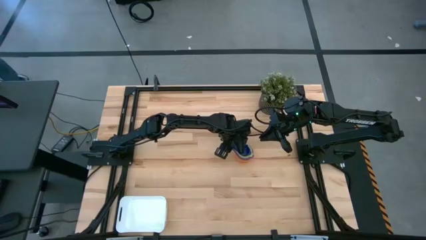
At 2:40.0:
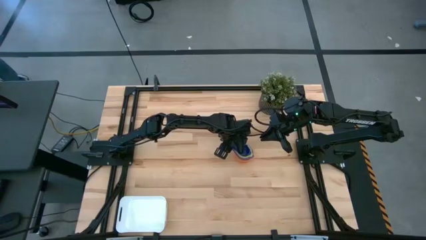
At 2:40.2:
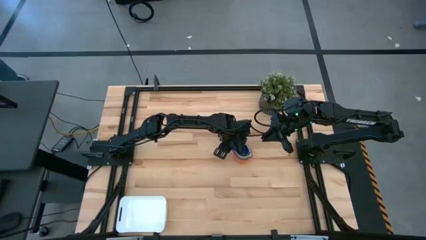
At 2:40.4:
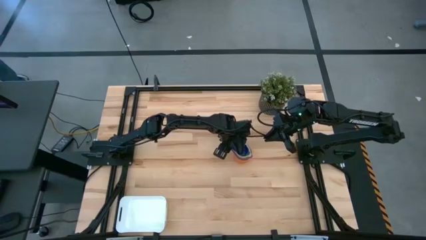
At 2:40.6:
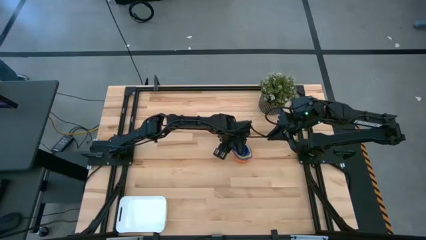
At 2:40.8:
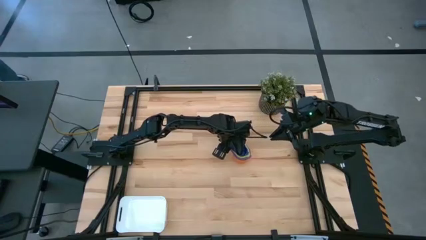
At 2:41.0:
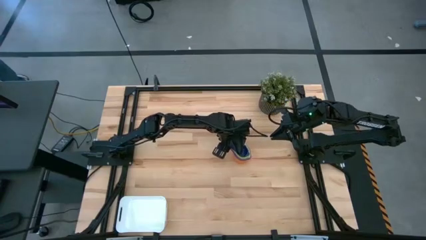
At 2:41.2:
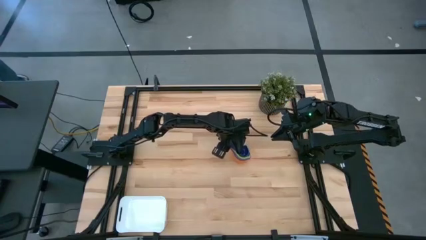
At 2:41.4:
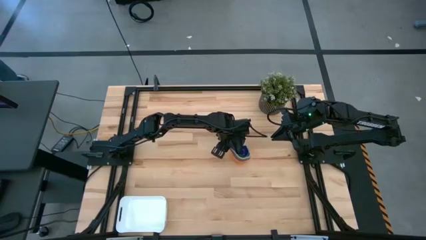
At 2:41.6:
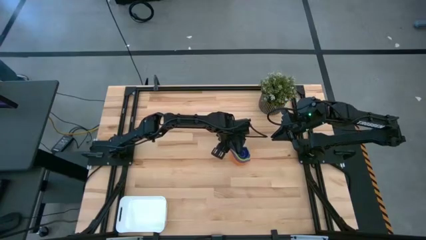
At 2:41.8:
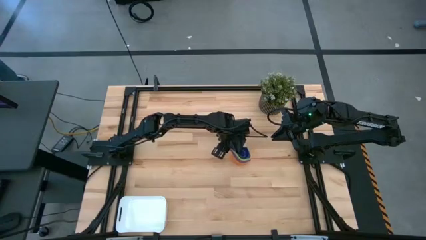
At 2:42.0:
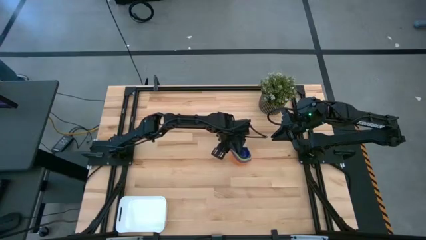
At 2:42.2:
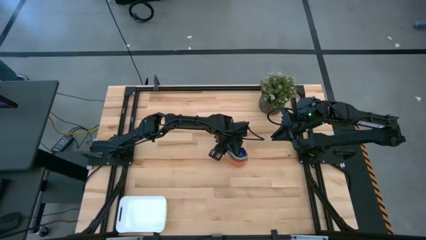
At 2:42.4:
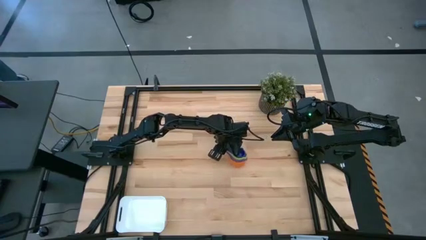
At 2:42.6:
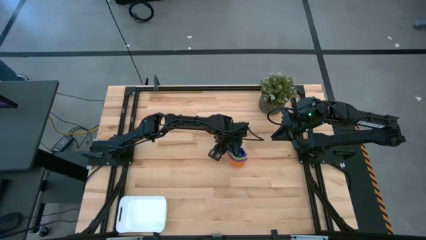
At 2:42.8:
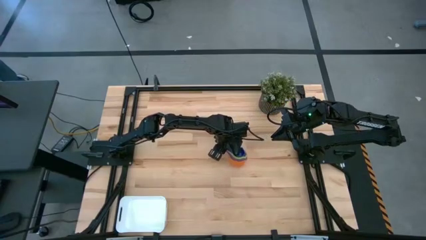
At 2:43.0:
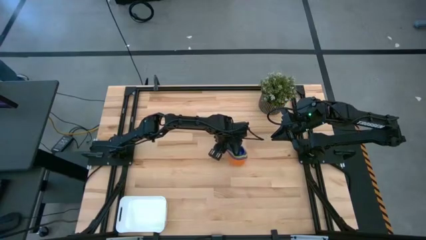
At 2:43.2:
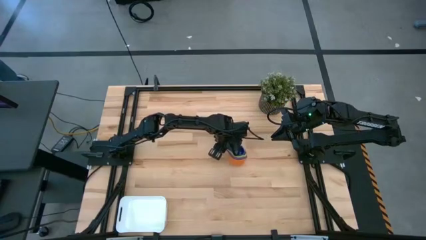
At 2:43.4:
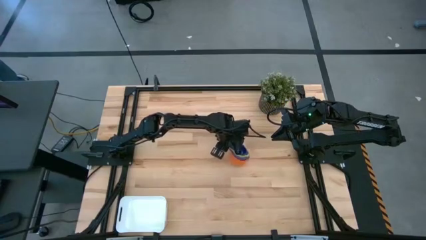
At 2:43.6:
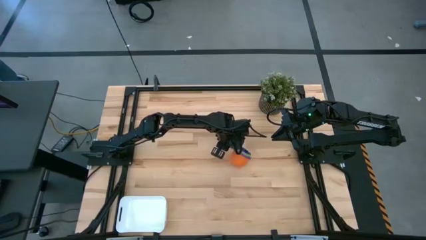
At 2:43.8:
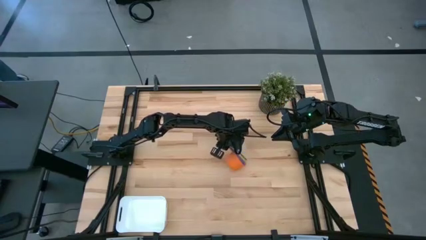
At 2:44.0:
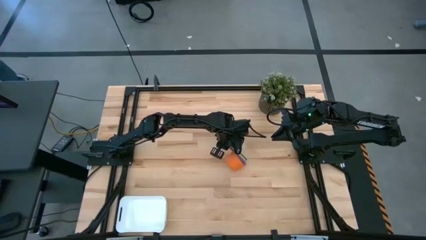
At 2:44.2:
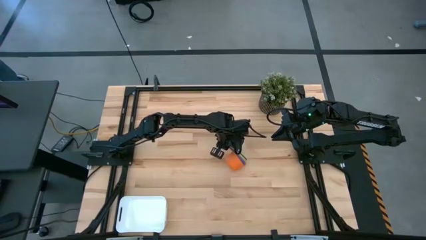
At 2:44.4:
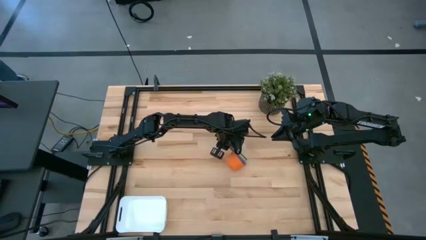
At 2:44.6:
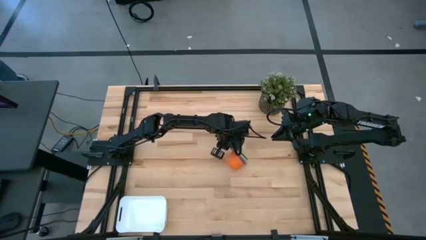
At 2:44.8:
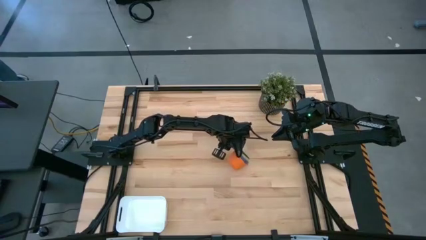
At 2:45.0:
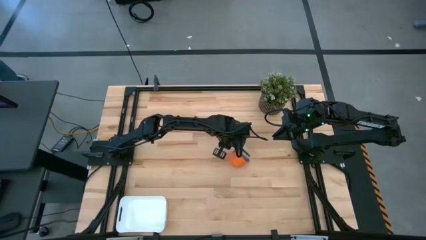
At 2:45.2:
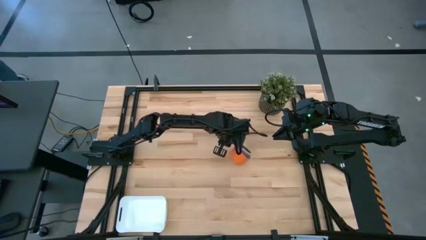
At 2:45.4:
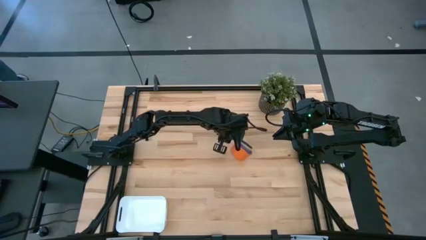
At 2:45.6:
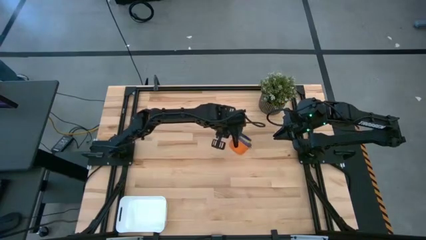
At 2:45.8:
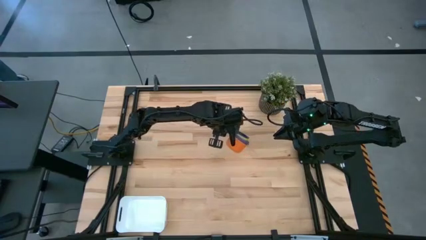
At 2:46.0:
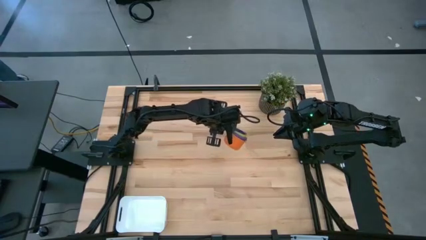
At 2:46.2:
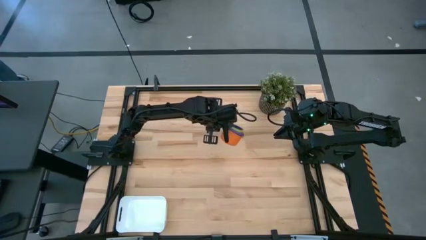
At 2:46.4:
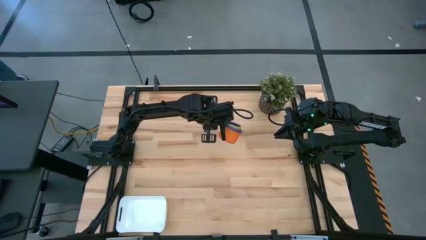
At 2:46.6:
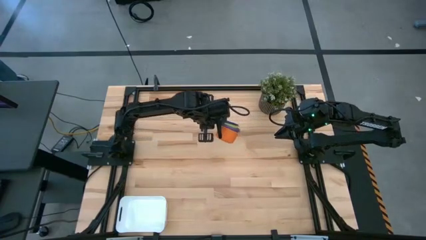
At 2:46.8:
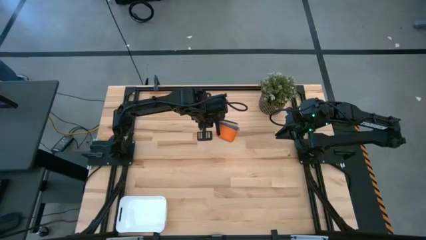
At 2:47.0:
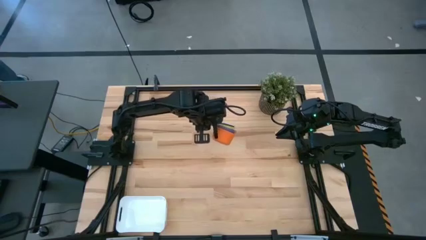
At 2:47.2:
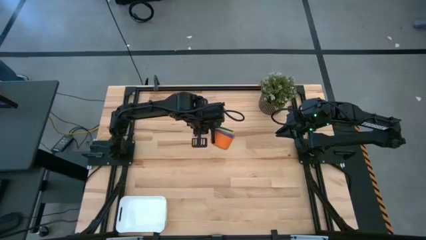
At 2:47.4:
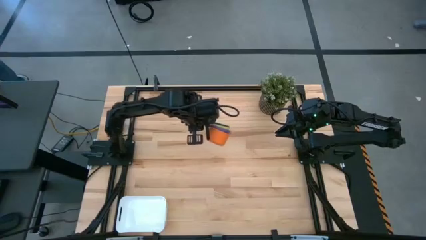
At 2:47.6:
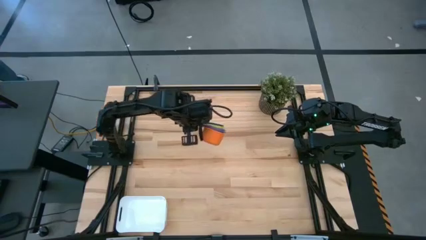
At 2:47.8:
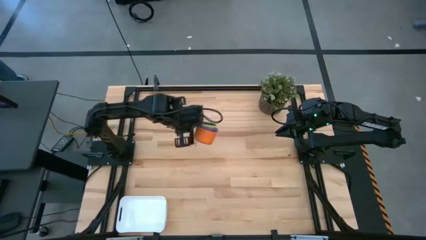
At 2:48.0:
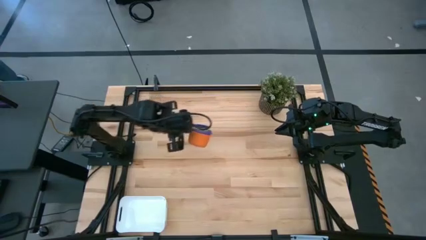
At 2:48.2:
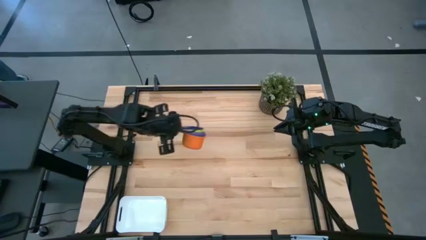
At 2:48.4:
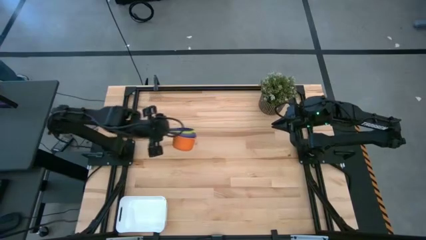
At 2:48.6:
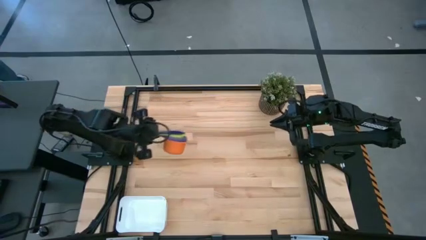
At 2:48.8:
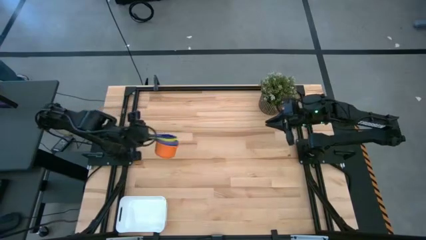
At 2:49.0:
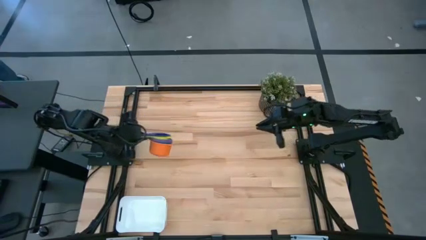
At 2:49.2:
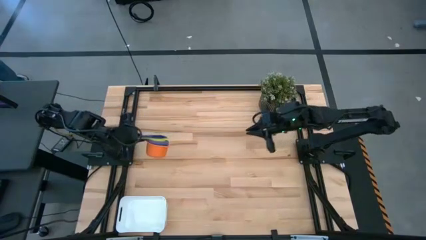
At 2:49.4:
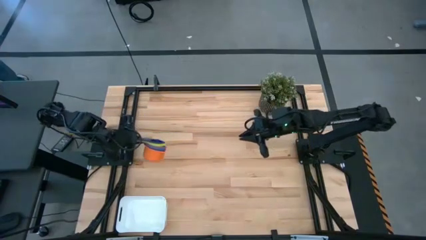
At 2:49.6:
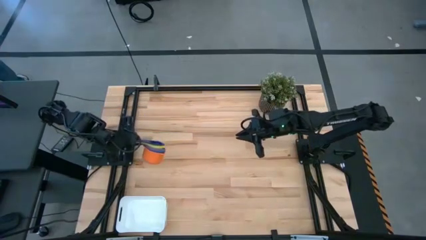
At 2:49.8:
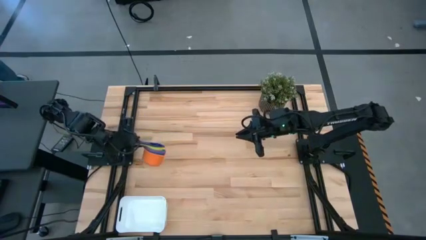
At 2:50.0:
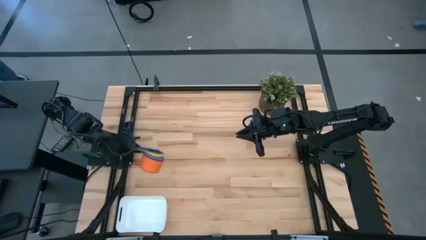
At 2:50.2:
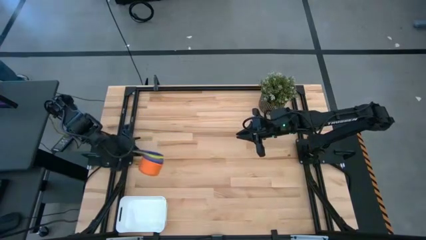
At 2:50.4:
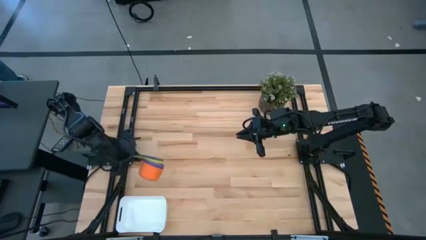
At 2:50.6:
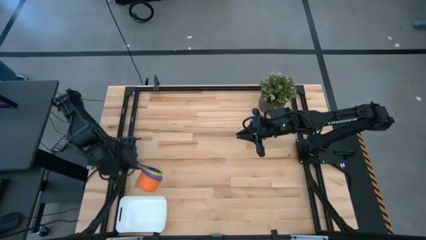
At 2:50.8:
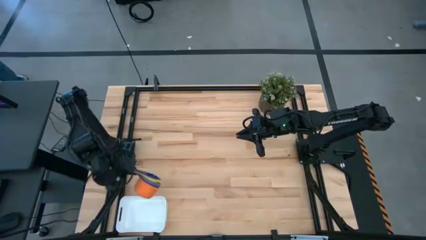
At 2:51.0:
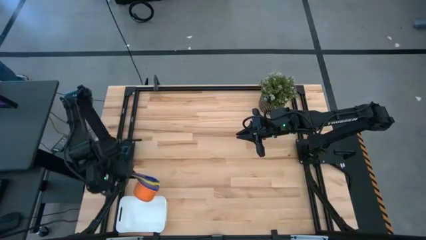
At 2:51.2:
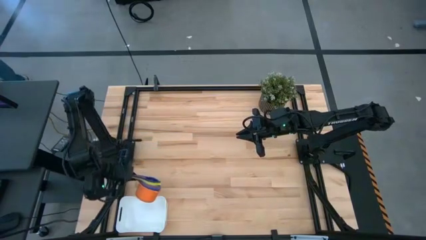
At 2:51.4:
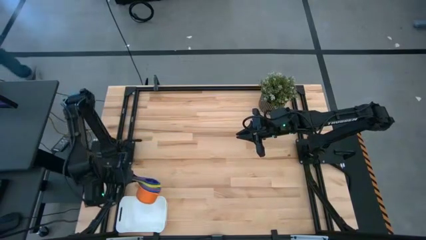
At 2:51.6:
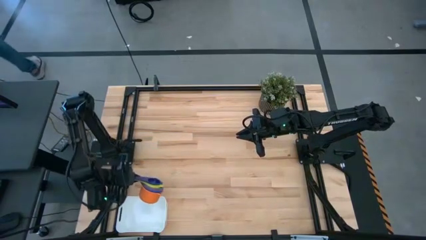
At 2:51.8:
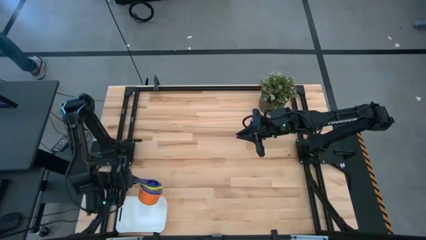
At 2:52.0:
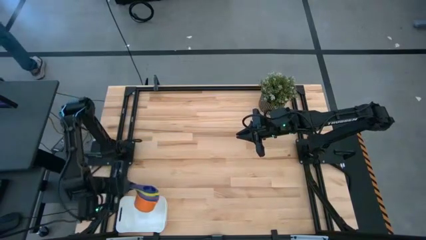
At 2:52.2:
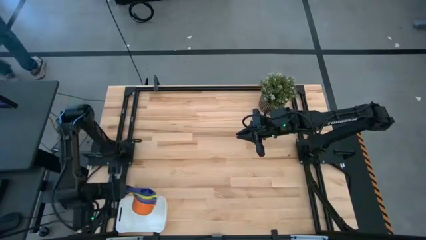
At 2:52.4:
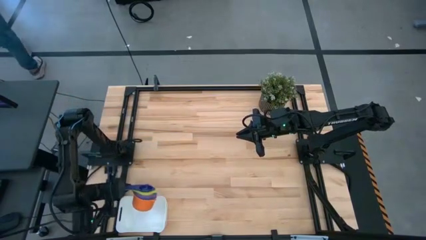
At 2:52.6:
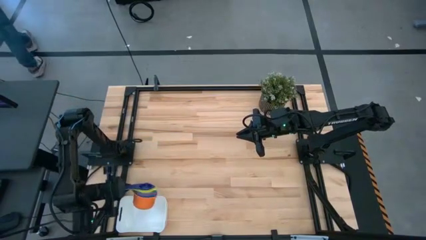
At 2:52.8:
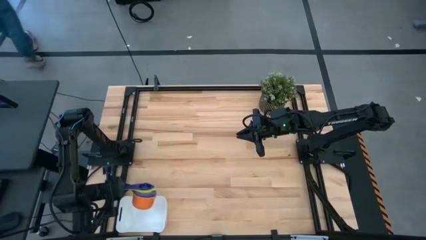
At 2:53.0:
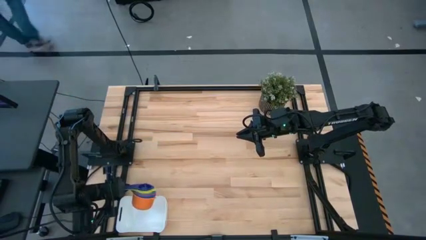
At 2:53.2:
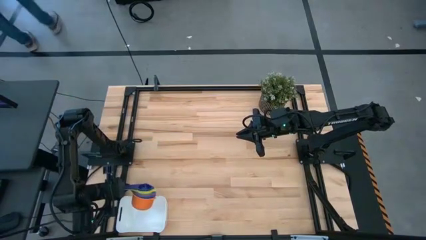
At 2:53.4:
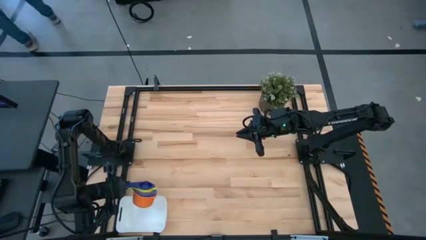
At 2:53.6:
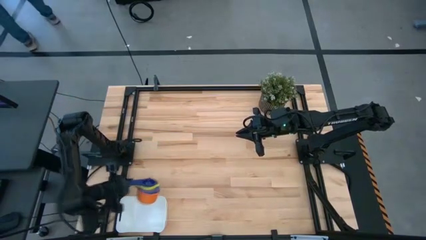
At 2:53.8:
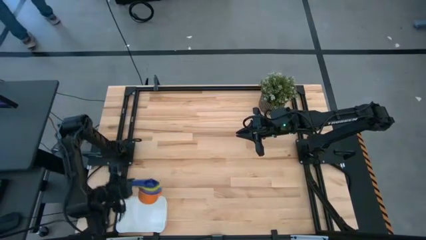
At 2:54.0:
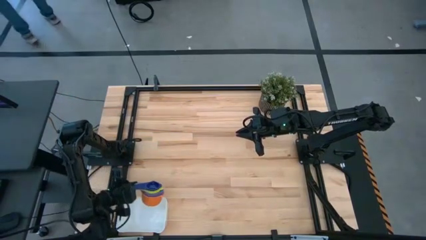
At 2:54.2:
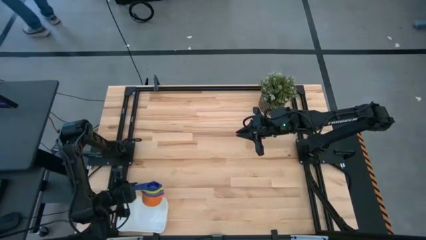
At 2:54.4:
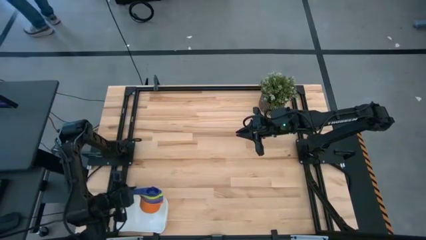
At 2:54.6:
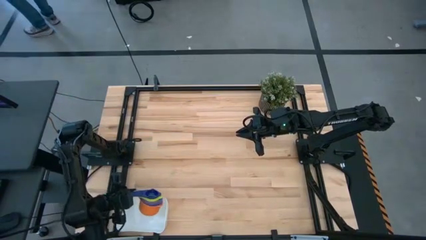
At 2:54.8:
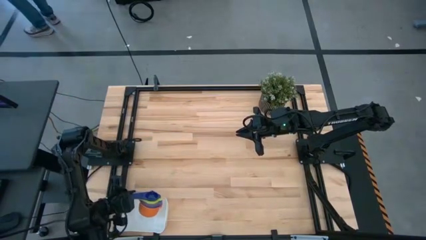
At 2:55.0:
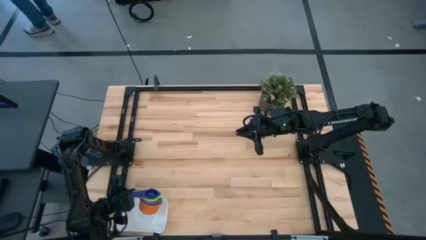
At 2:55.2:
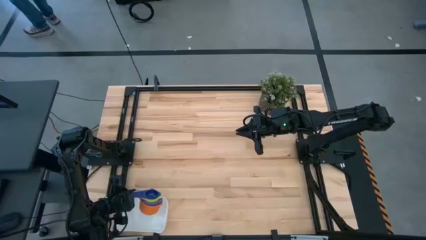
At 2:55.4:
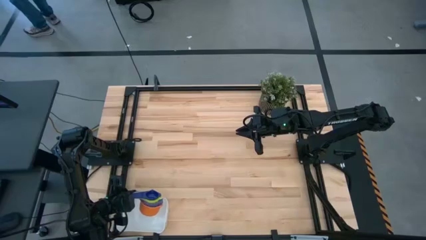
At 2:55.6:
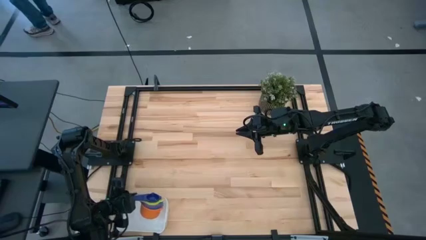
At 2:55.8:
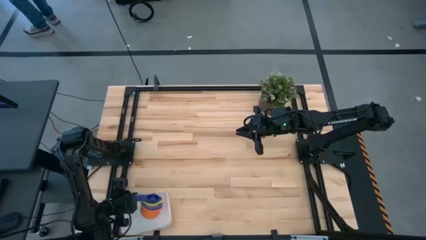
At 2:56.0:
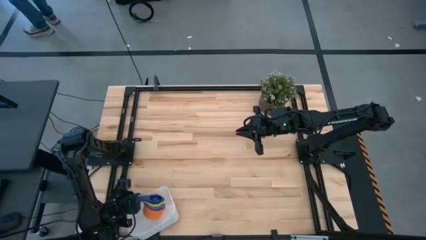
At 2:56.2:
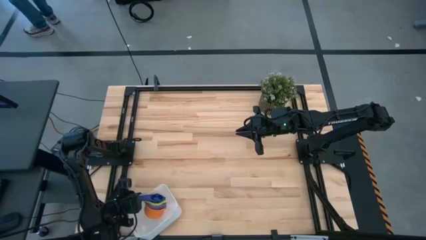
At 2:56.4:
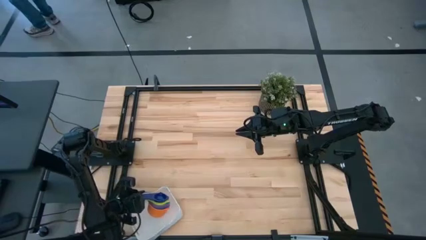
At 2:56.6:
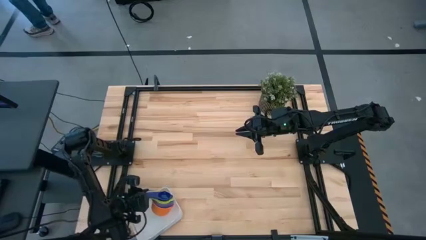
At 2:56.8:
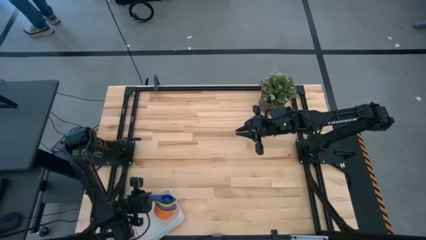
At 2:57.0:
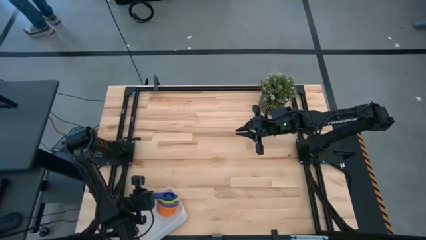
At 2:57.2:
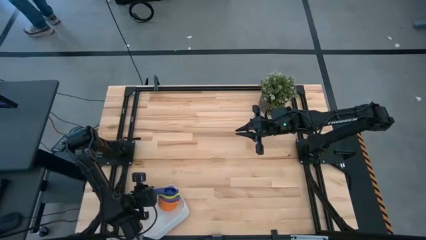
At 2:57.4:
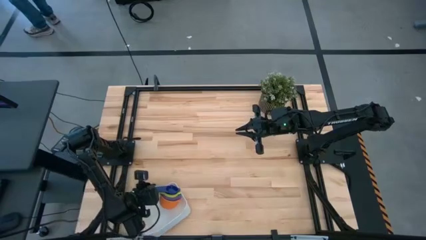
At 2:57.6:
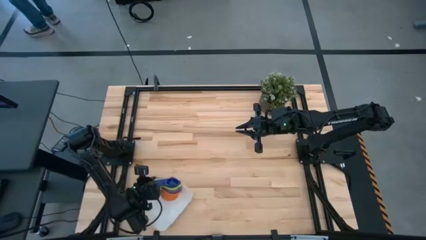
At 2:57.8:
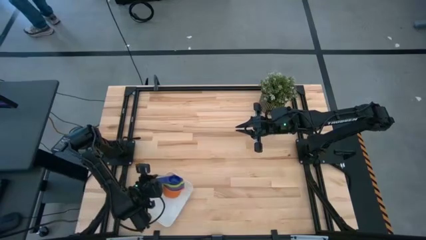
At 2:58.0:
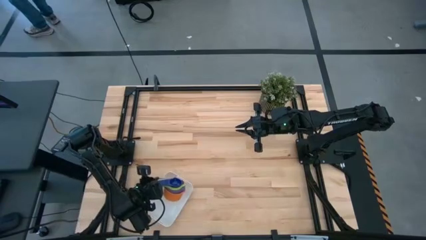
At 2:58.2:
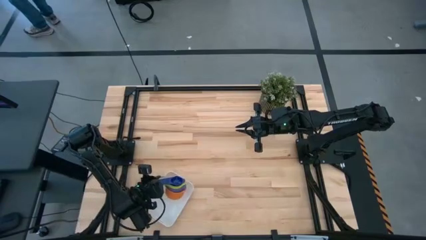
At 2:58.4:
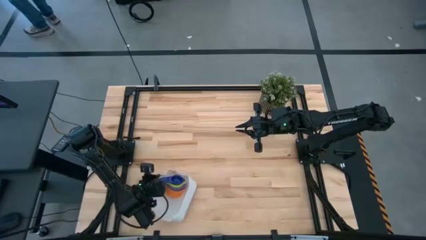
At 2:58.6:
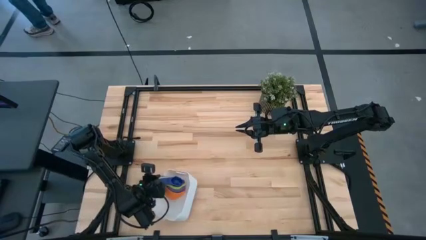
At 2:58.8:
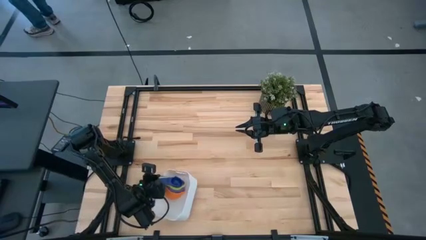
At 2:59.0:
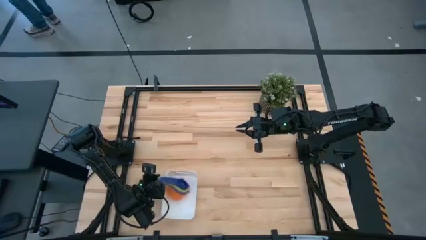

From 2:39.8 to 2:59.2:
Task: Nest measuring cups in basket
Put the nested measuring cups into the white bin
